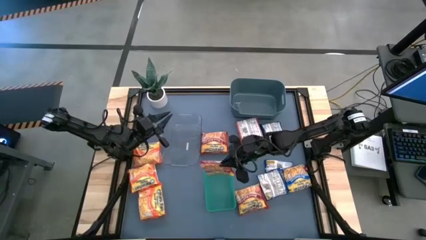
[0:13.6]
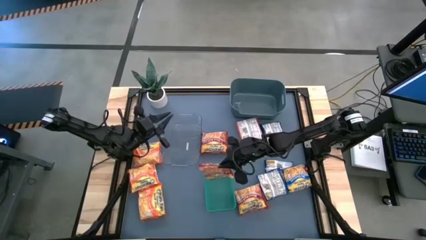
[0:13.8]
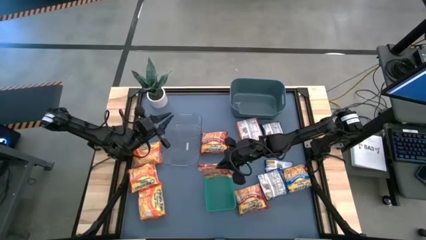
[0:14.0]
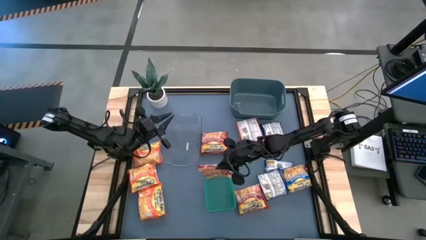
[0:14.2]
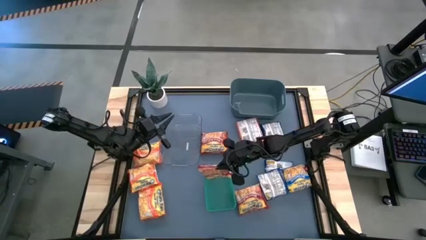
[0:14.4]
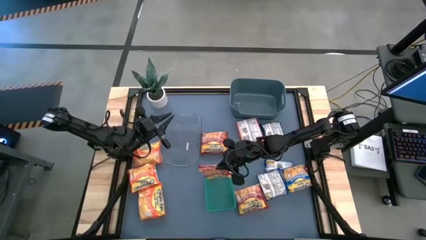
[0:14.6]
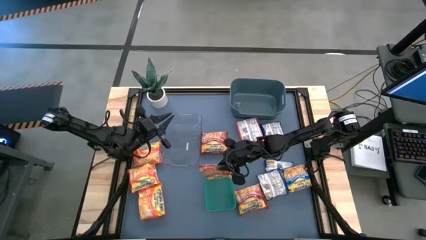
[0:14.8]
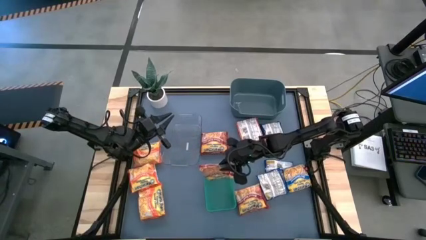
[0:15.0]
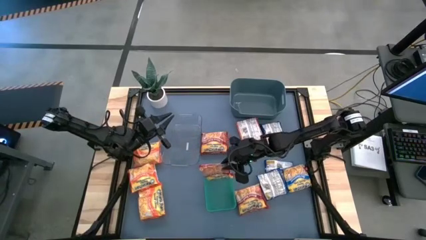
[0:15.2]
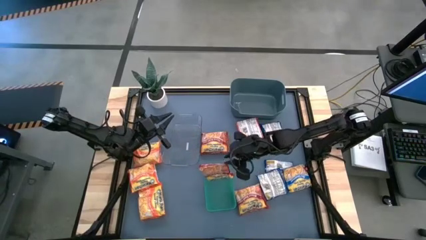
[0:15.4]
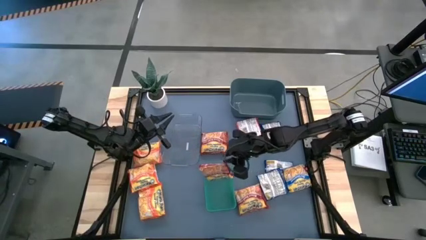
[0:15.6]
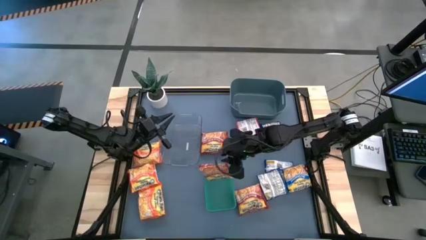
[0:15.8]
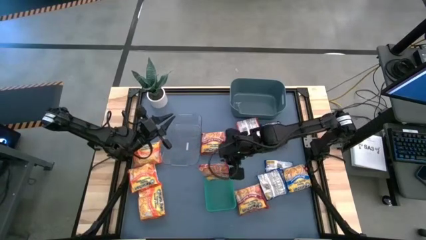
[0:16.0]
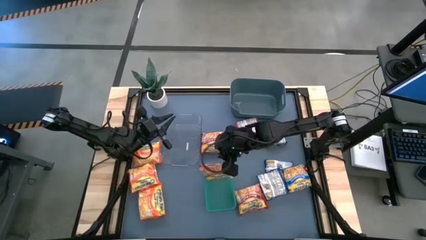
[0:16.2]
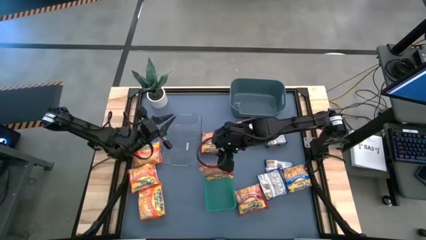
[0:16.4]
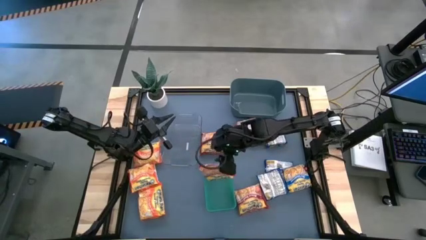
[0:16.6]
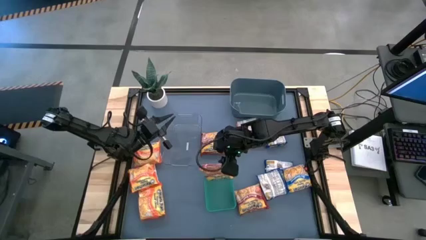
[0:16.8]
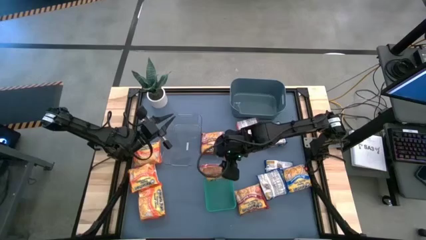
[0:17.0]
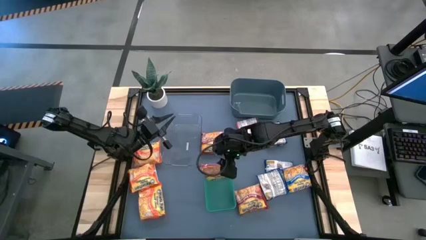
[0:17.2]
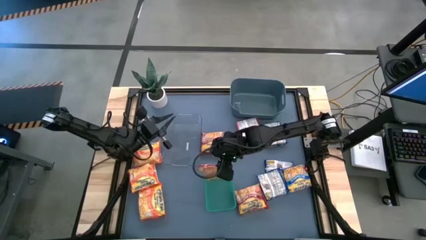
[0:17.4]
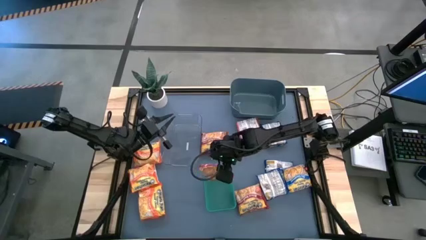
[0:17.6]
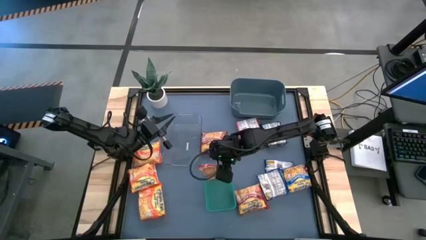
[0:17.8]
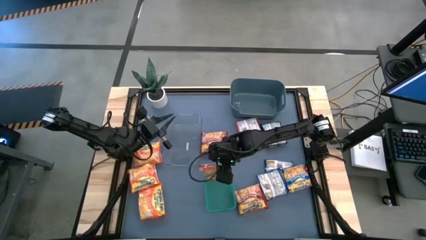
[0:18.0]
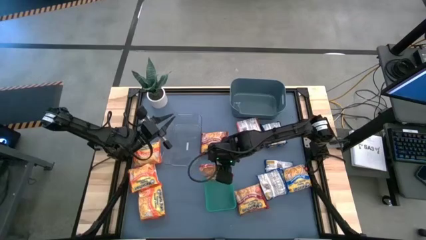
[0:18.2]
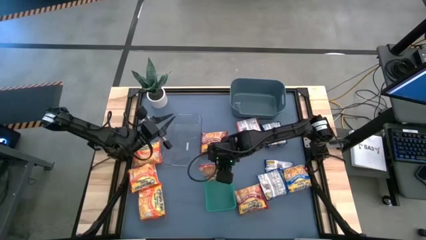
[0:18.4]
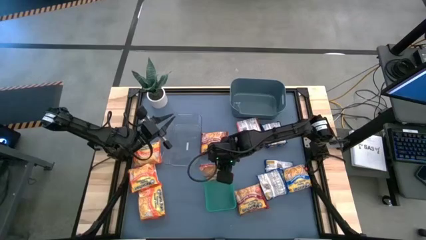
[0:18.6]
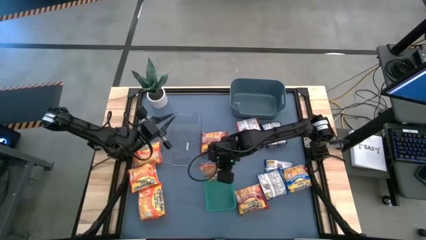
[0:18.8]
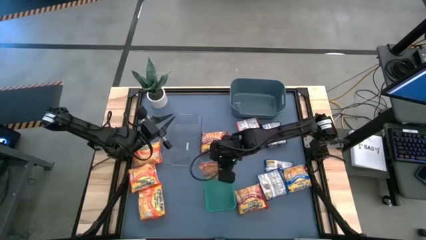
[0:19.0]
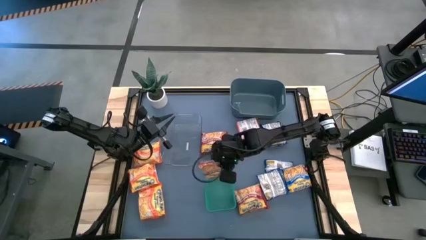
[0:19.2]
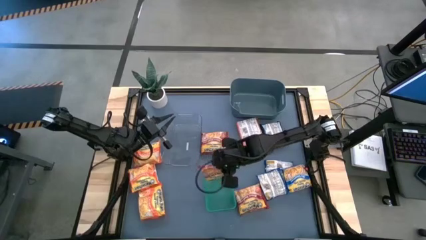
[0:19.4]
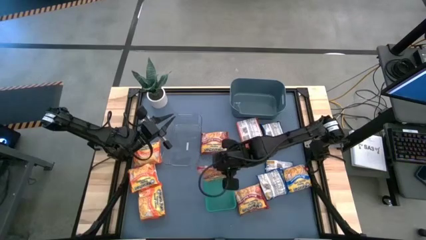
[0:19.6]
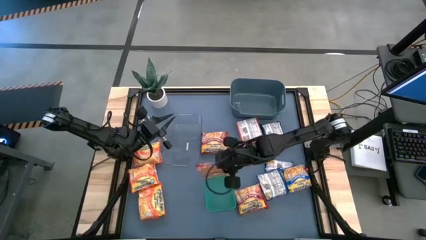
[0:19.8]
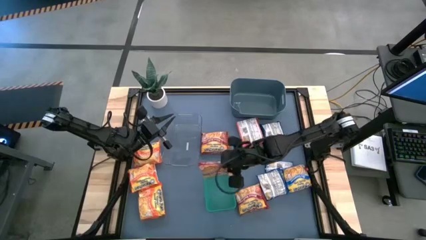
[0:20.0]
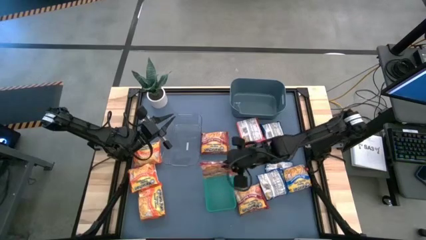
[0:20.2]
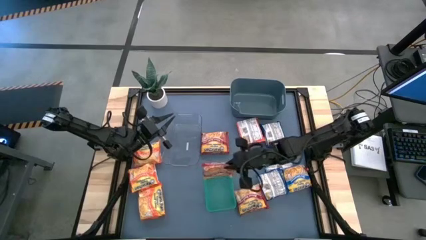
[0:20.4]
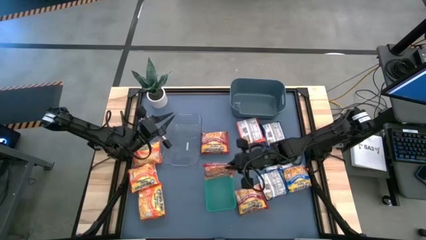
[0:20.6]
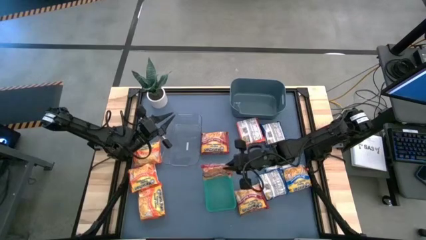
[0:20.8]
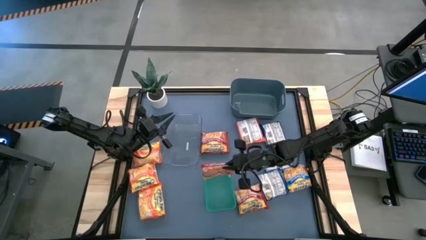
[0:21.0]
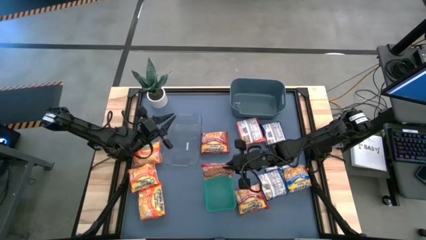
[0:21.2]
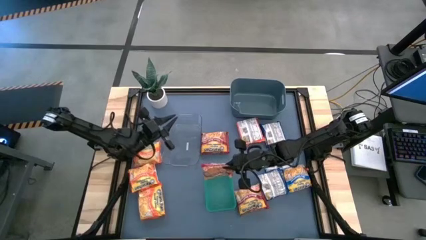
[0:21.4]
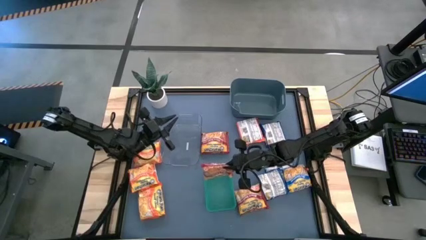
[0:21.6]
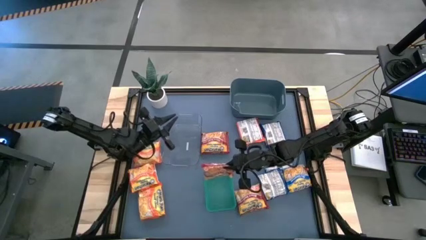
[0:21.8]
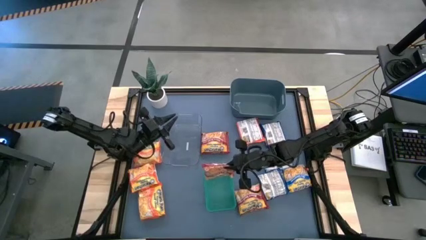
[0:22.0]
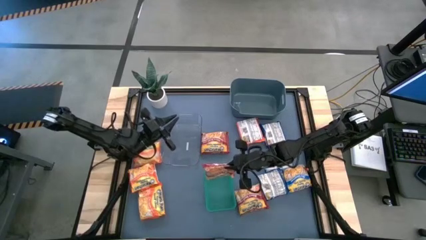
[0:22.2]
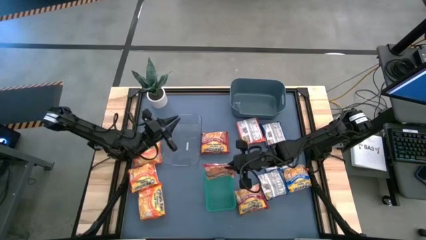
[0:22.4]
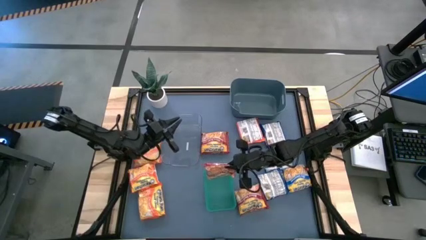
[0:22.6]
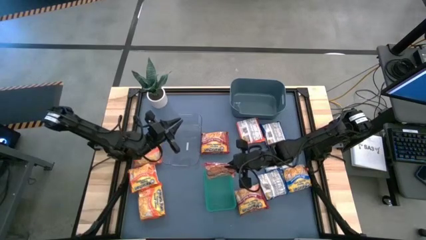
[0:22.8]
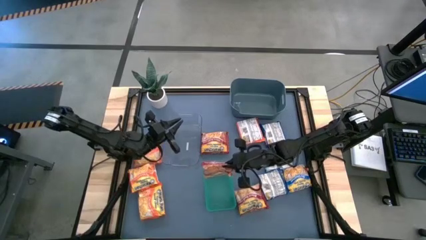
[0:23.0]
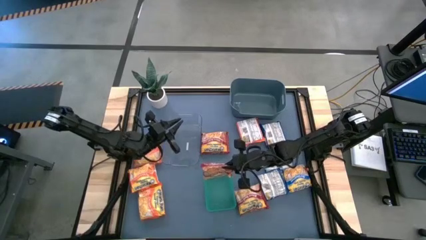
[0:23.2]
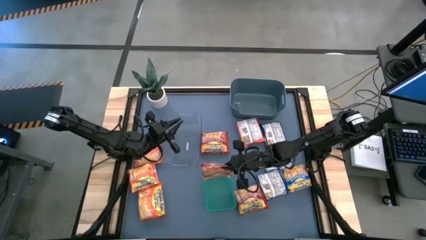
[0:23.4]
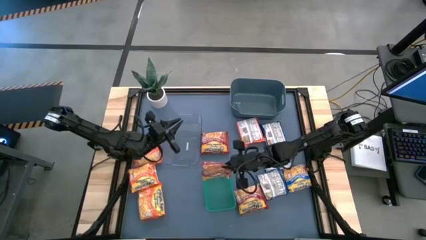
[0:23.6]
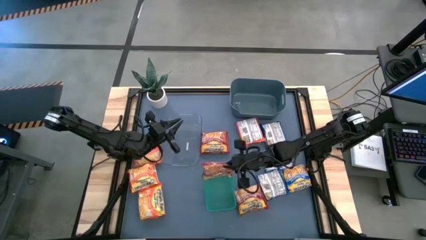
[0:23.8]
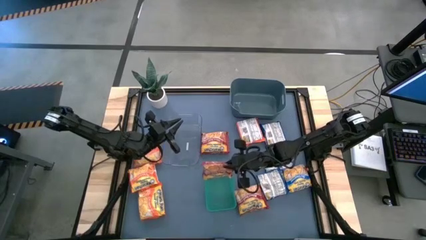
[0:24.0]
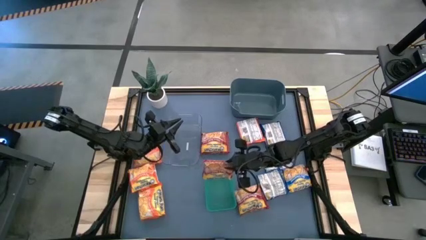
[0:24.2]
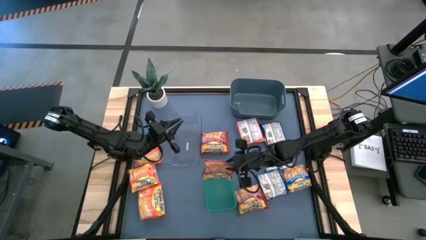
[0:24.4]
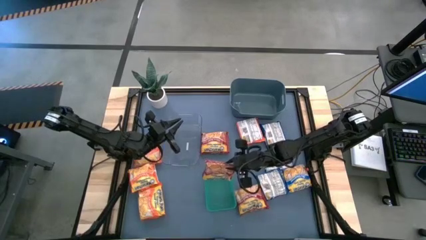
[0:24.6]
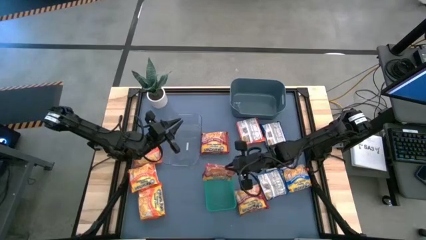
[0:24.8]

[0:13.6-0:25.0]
Task: Sort Maruchan noodles
Put the red noodle pack into the green bin

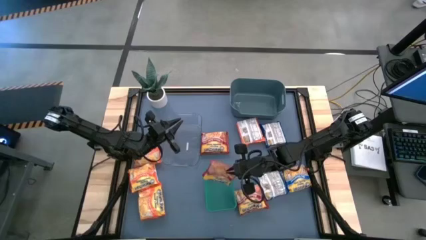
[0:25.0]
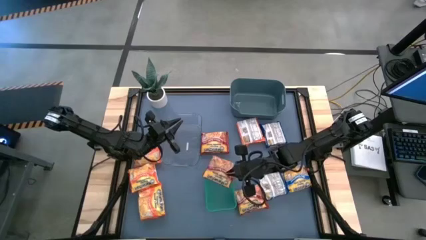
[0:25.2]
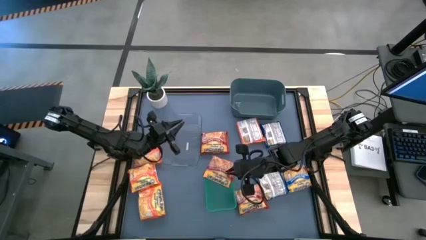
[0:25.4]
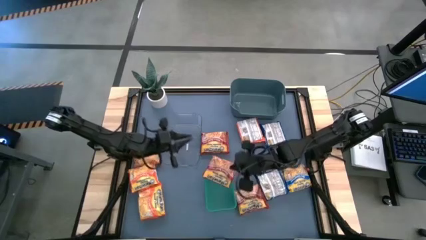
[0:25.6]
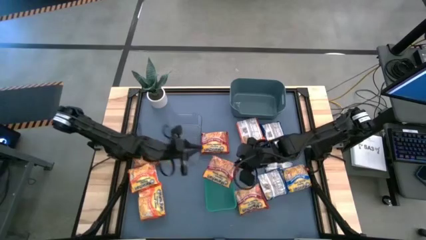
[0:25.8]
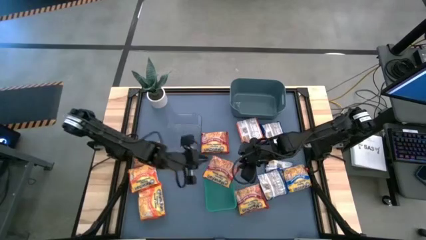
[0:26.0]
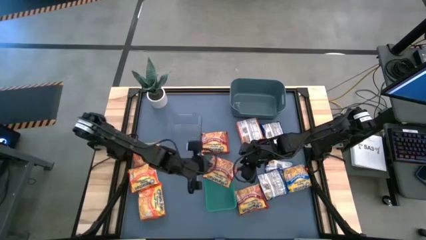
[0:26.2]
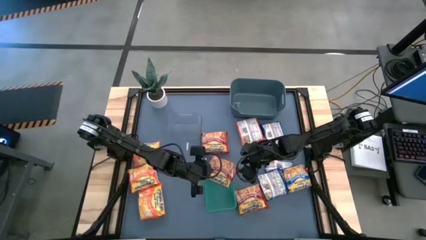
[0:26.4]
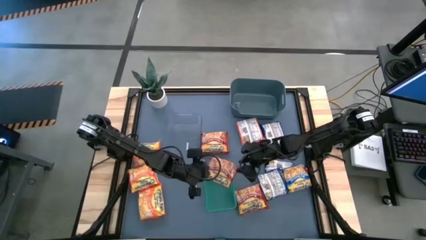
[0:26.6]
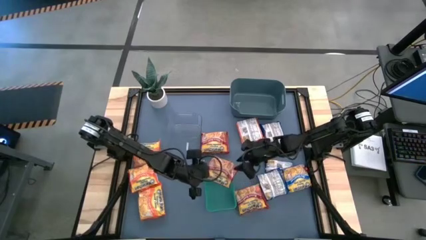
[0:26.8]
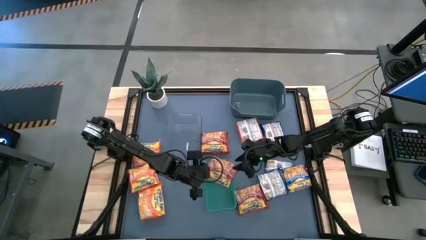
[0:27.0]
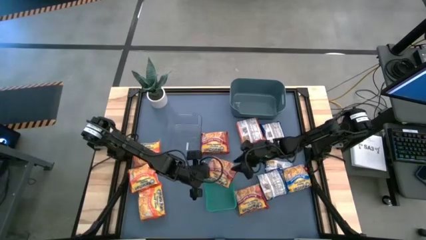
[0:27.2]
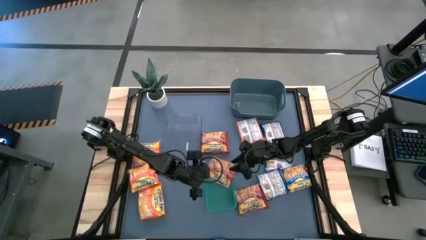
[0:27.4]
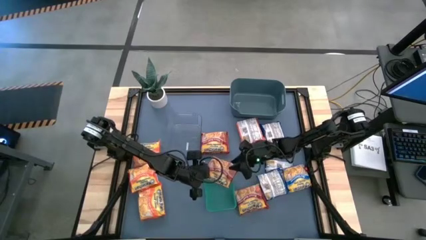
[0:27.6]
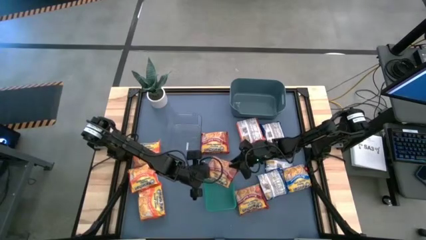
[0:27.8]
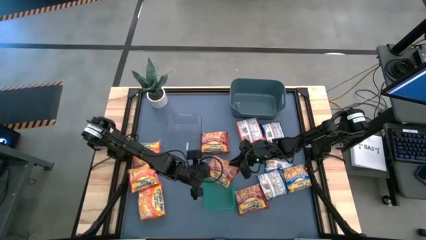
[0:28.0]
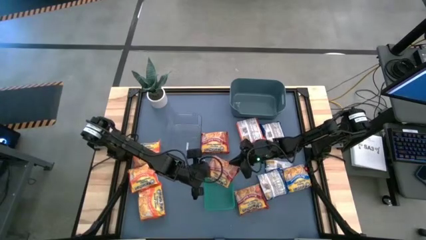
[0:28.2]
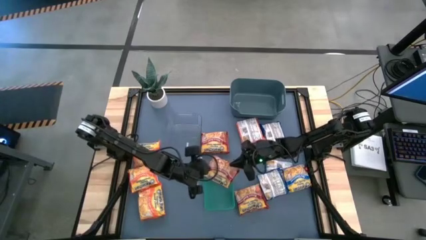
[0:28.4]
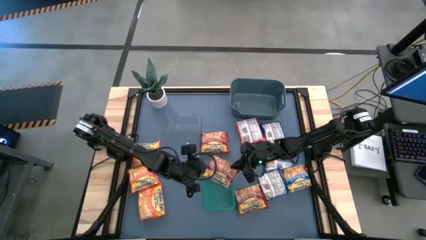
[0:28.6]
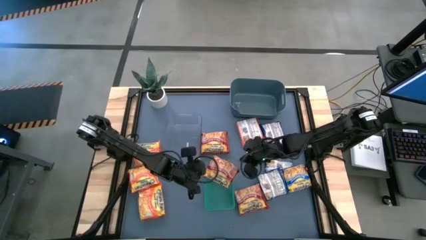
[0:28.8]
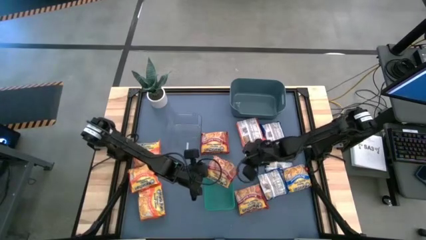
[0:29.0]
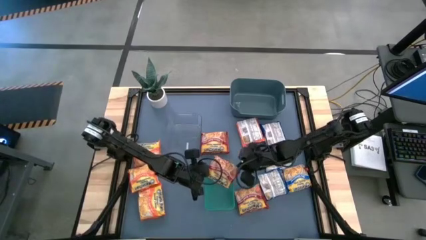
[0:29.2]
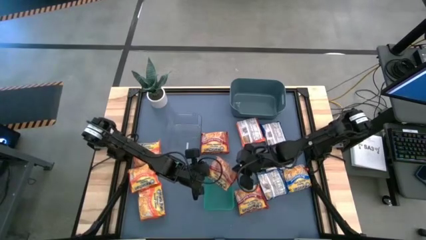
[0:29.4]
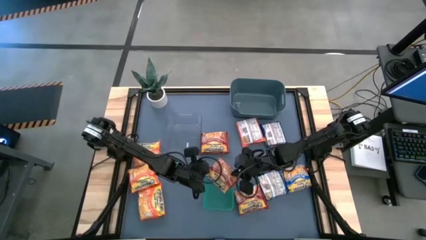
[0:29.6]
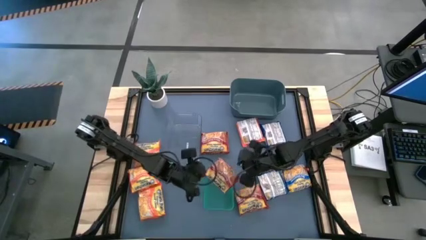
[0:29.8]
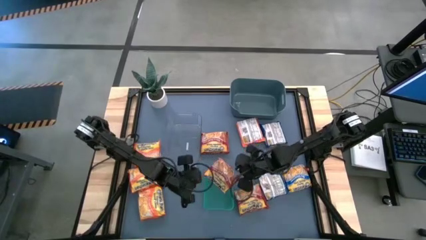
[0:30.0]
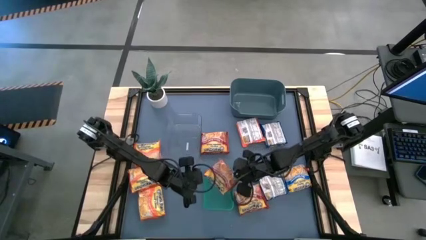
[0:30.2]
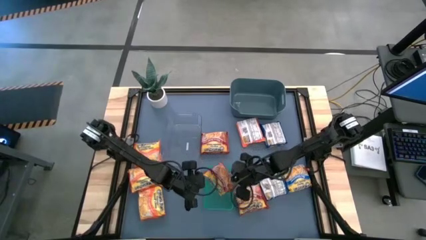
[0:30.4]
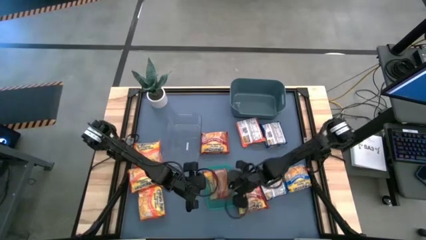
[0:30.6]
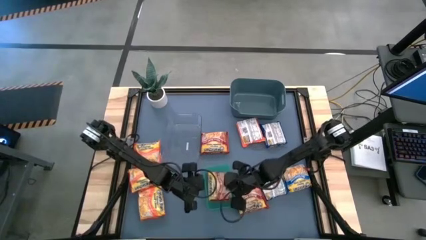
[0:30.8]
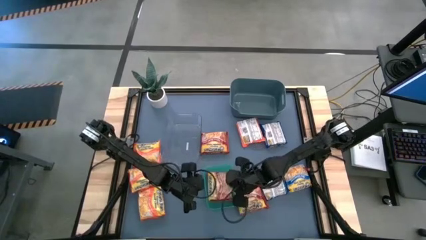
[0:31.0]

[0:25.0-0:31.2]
Put the red noodle pack into the green bin
